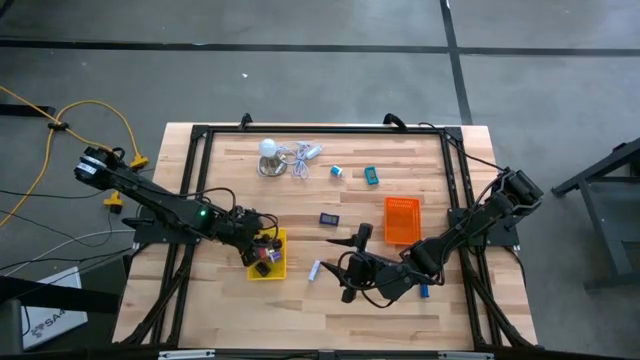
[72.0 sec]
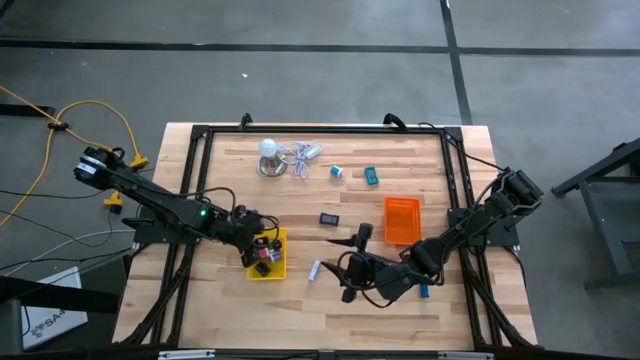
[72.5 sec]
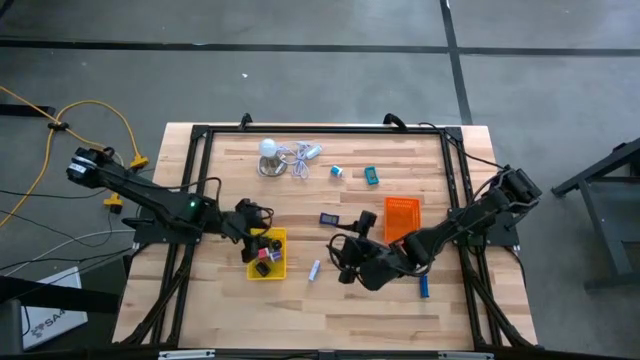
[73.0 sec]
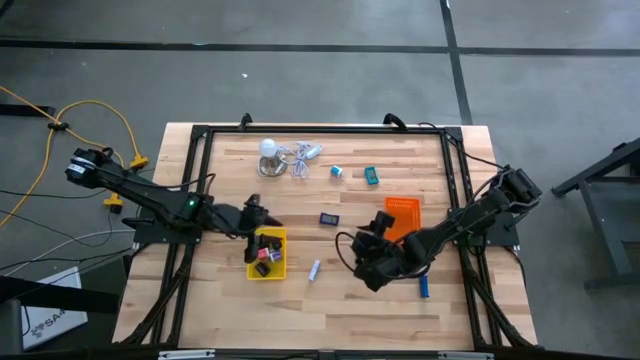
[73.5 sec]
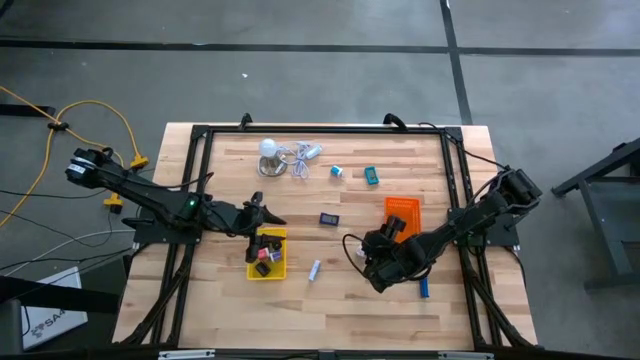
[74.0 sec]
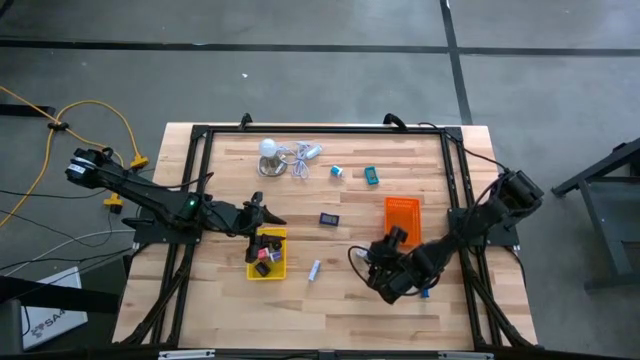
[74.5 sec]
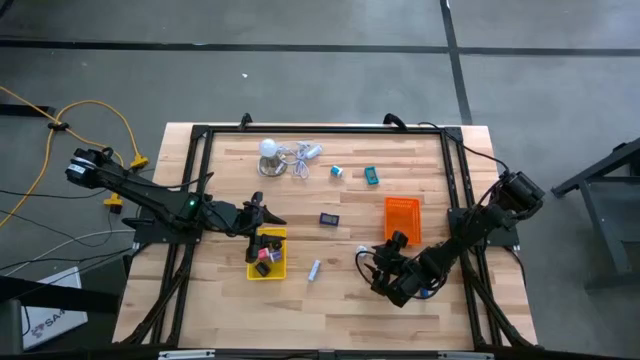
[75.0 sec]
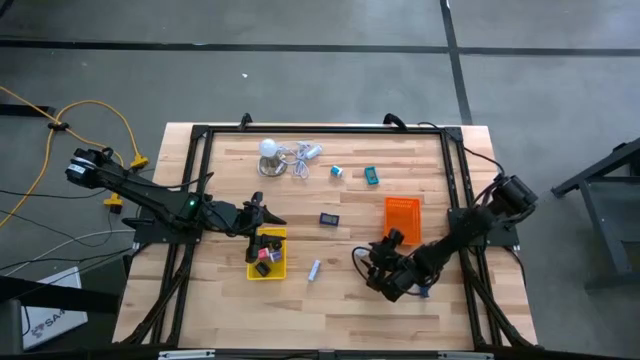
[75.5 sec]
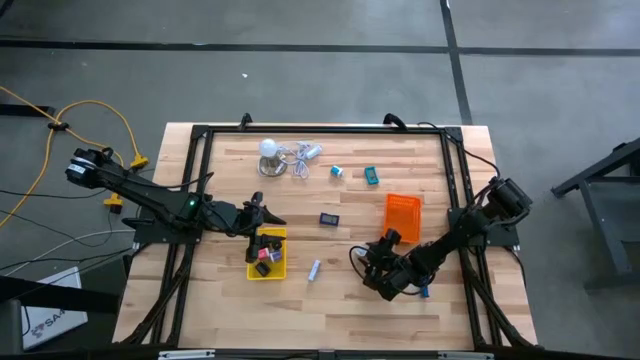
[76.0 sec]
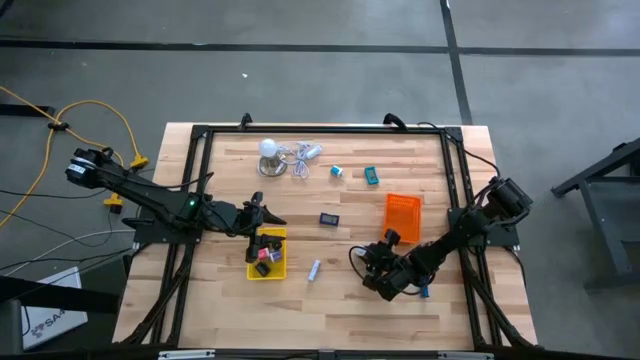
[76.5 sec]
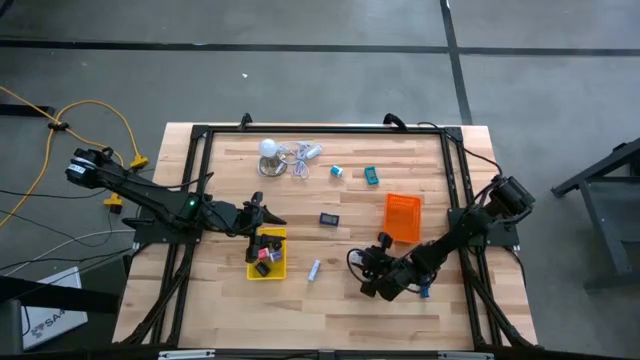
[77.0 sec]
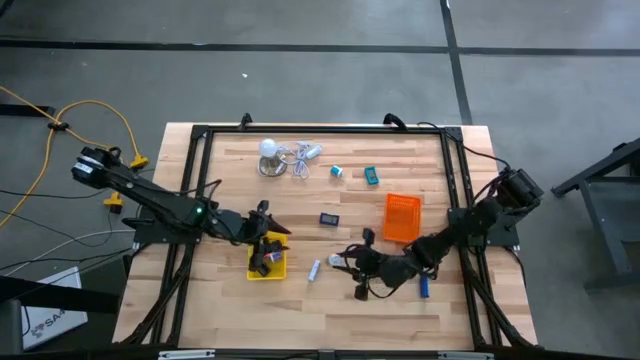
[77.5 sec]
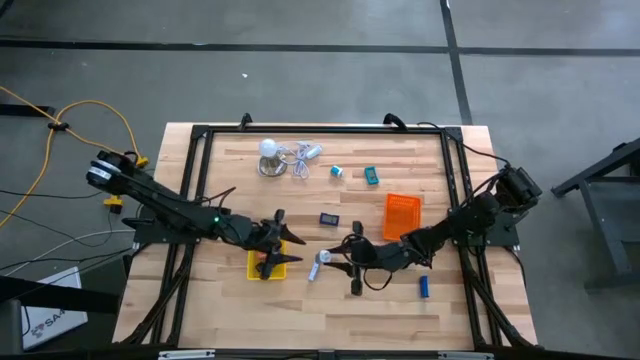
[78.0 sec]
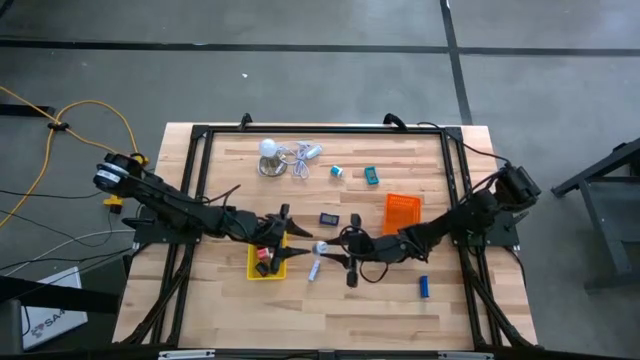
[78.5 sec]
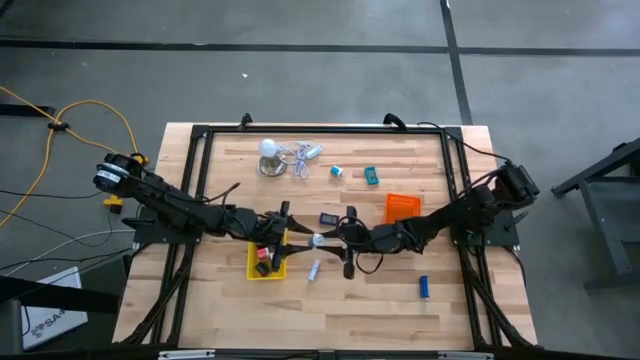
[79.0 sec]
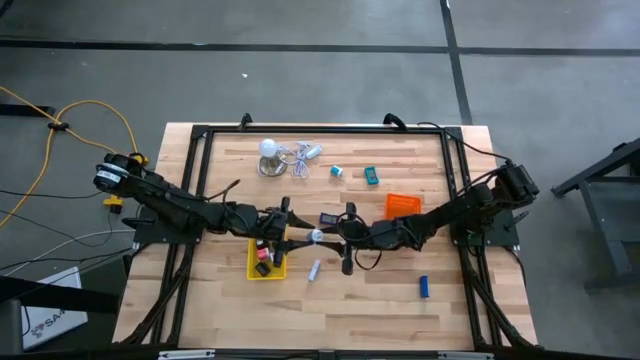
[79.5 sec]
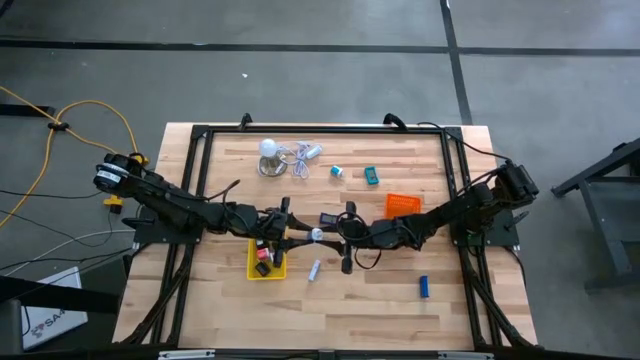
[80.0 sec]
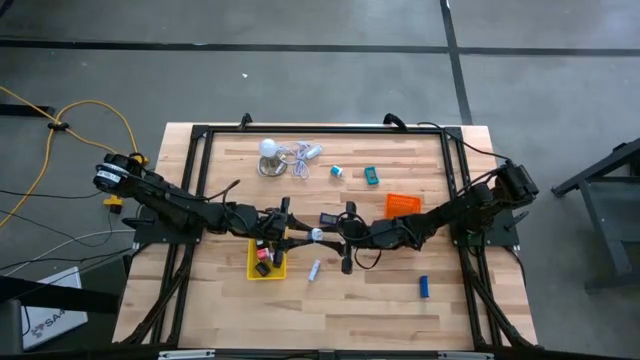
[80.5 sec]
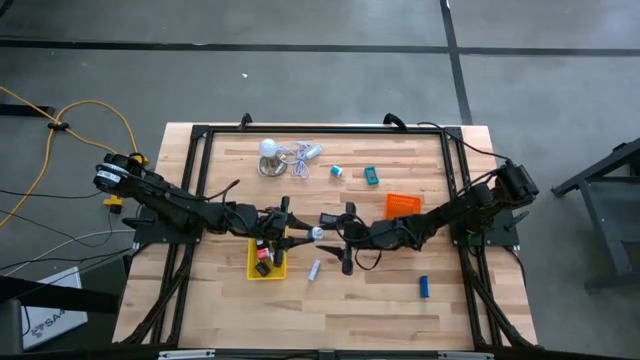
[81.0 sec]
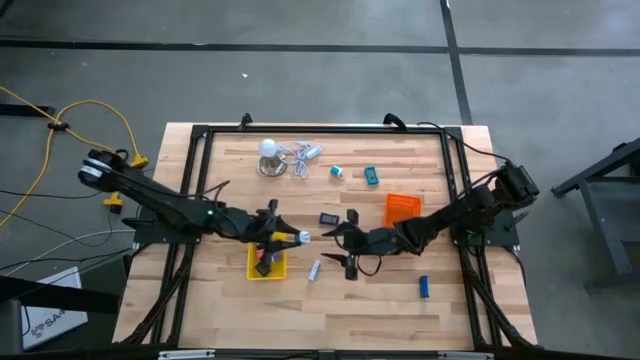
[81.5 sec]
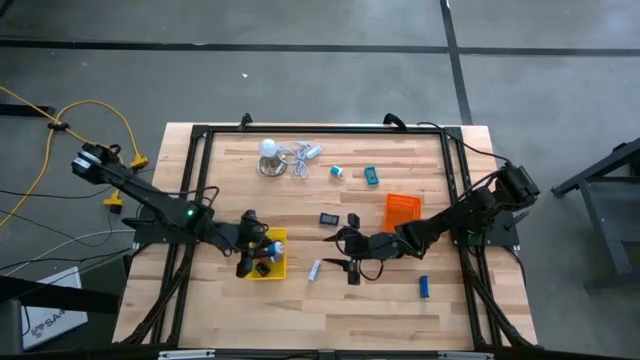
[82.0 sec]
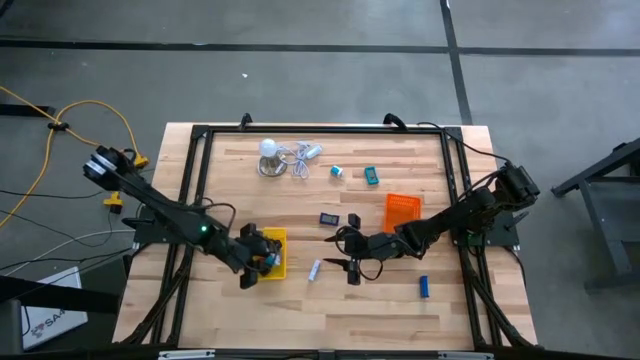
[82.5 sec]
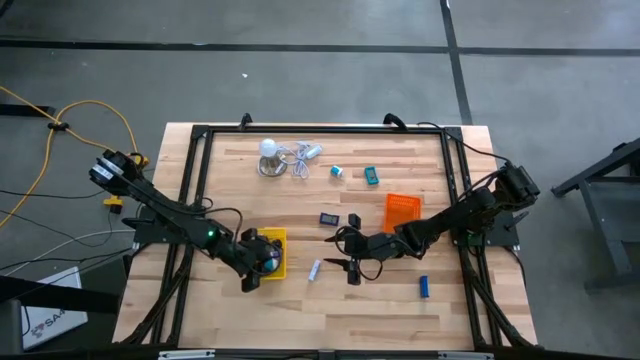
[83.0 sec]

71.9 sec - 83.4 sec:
Task: Pick & Place Office items
Put the bottom blue charger adapter into the yellow bin

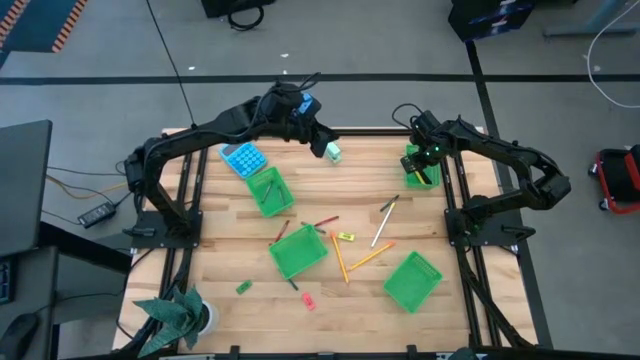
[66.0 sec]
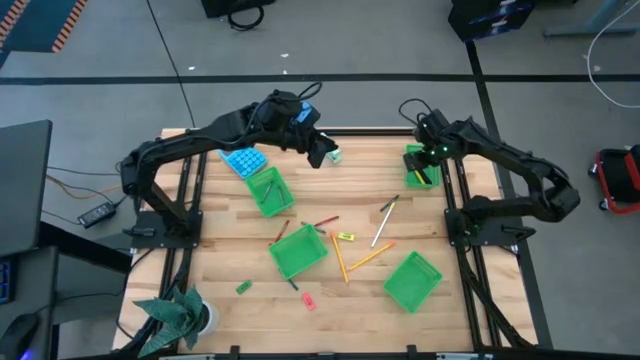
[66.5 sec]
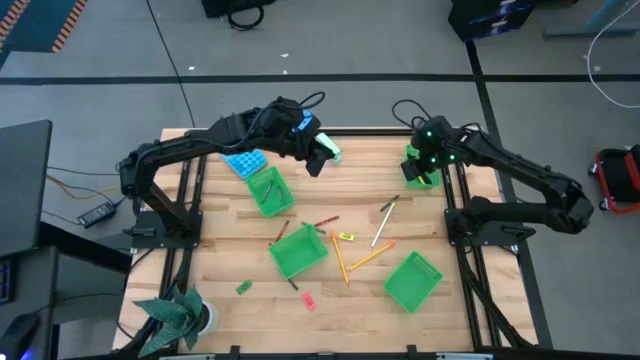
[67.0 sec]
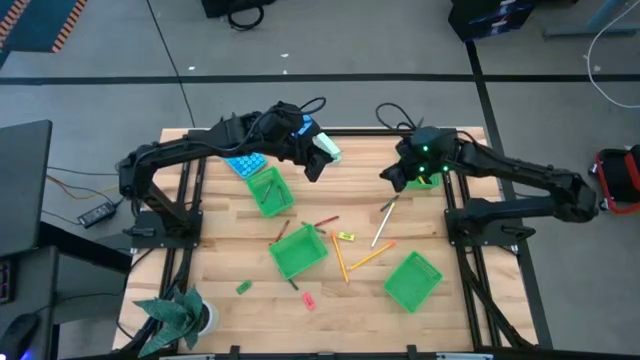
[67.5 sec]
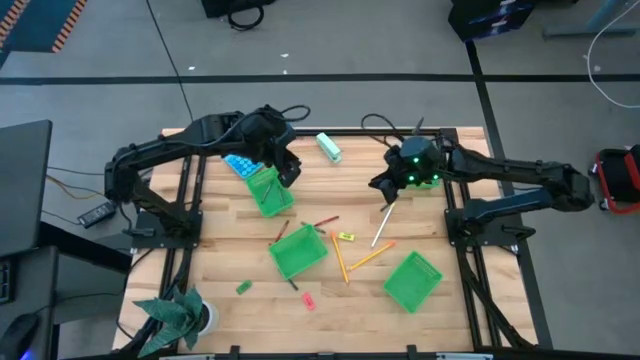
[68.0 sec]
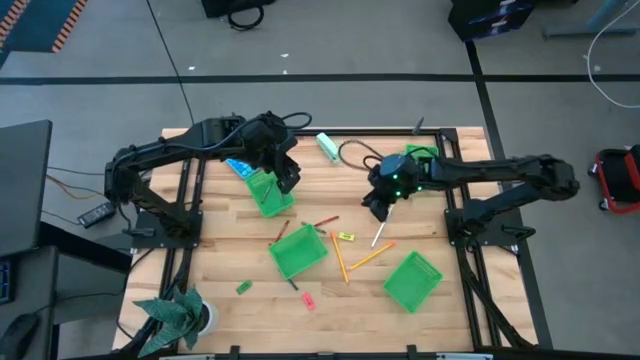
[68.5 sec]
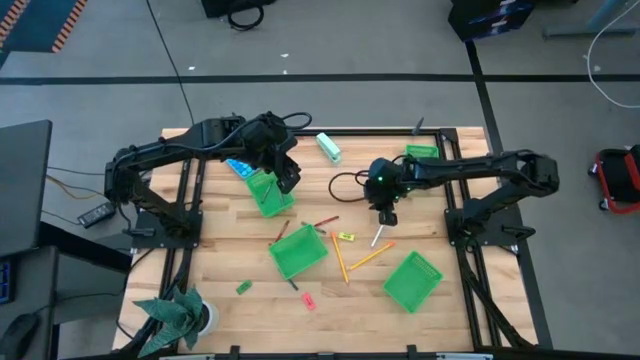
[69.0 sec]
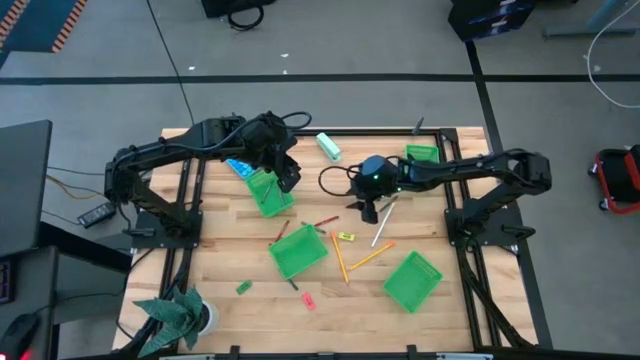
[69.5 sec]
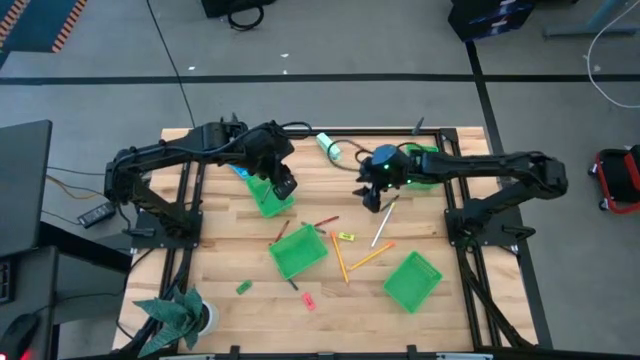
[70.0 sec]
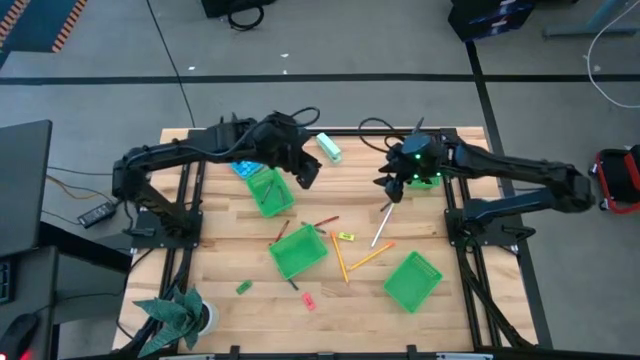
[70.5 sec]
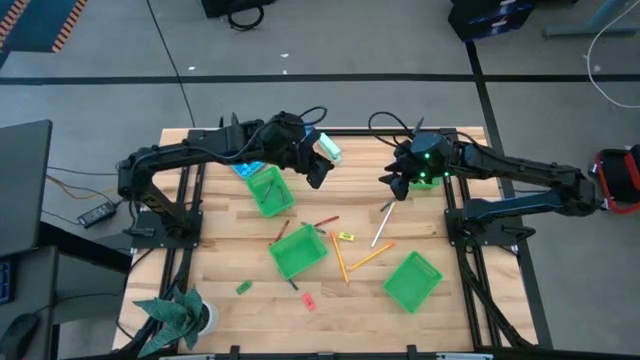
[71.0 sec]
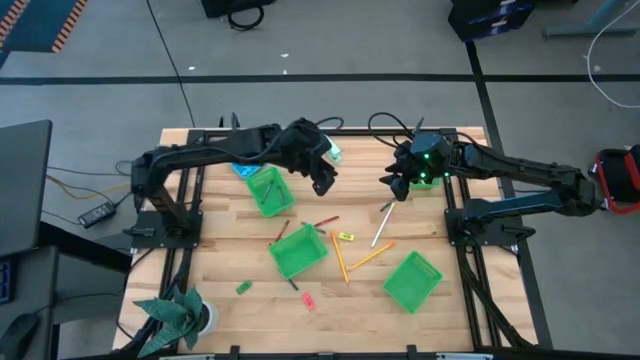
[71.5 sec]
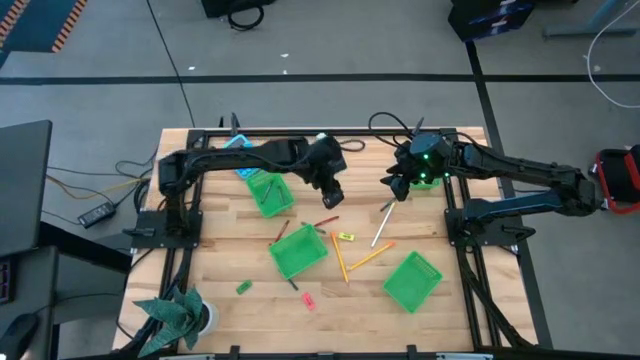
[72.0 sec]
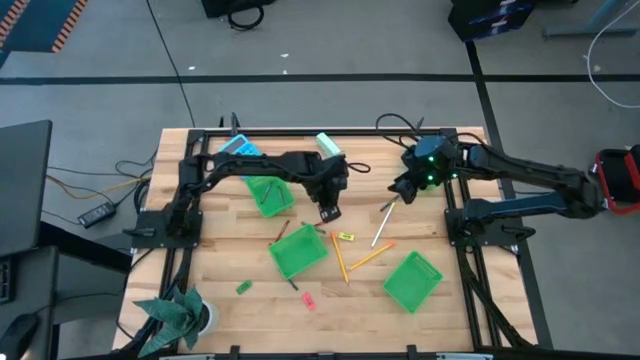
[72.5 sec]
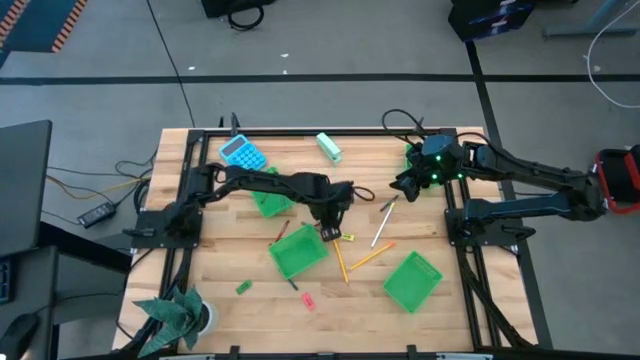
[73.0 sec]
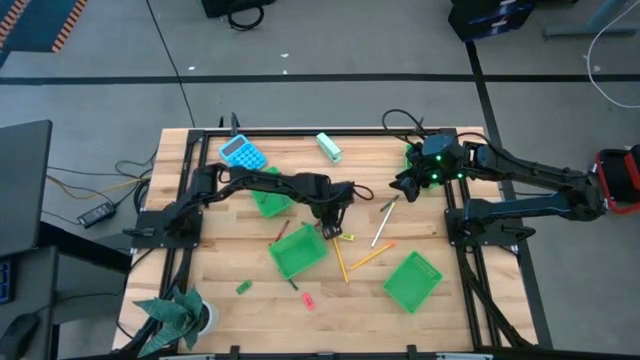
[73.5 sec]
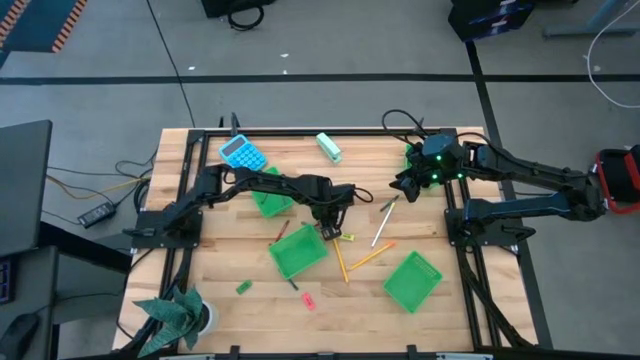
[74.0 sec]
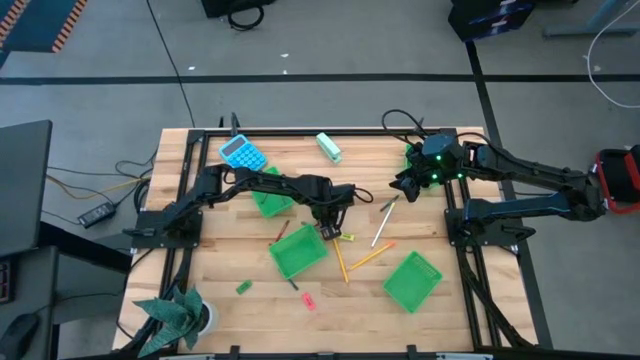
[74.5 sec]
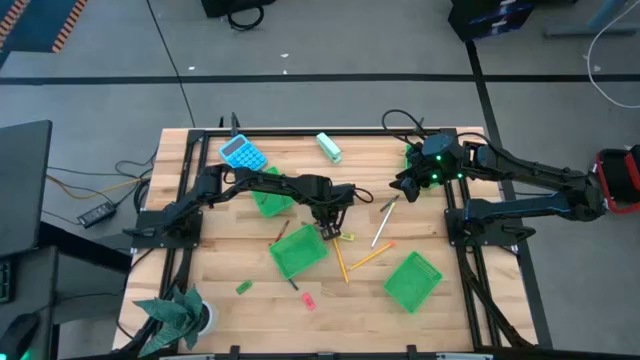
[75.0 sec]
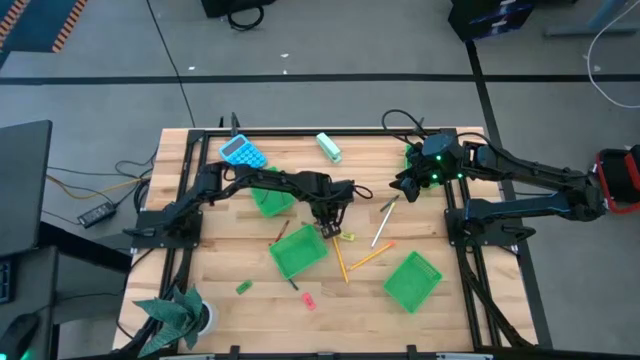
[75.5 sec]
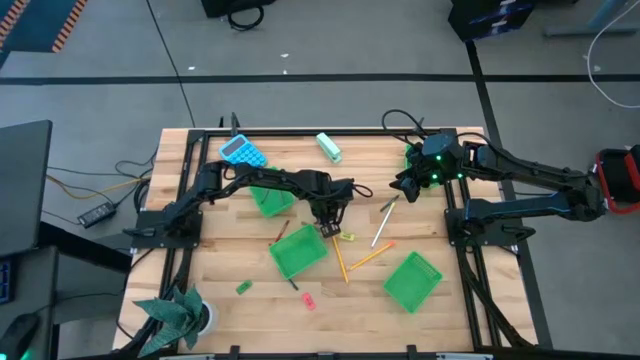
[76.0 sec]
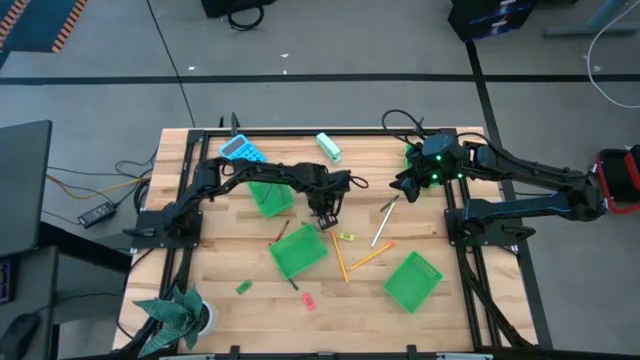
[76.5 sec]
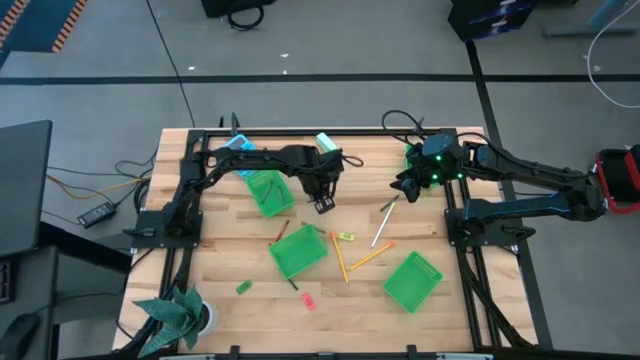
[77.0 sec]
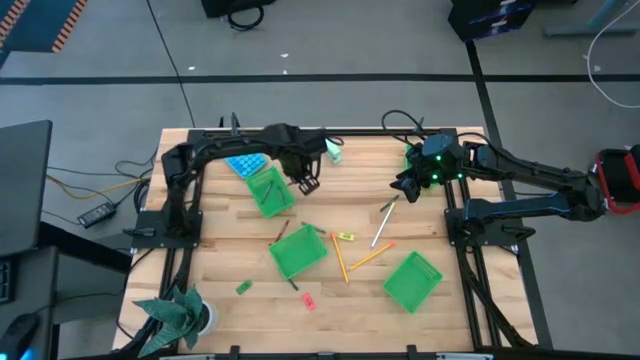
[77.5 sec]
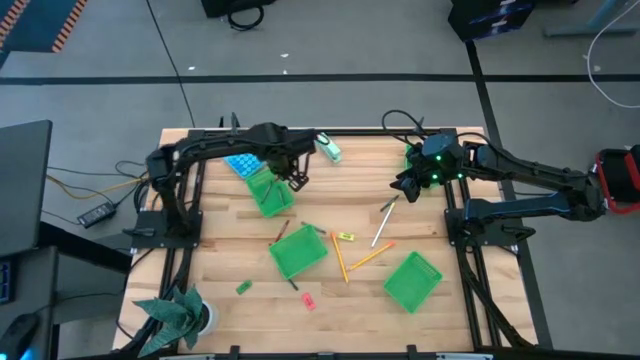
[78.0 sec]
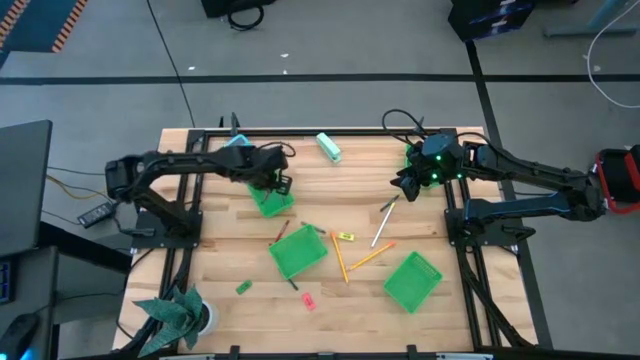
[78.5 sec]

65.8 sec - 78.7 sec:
Task: Sort crayons/erasers/pens/pencils in bins
Put the top right red crayon into the top left green bin
